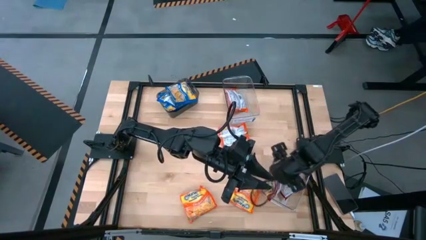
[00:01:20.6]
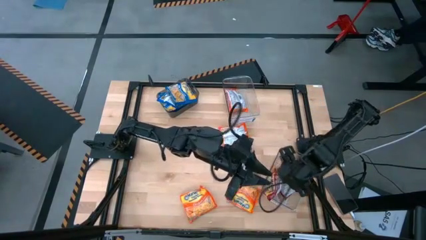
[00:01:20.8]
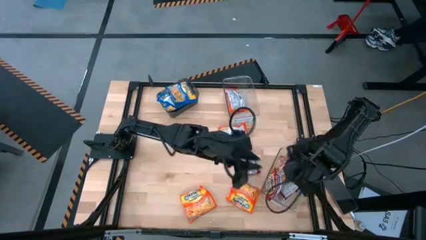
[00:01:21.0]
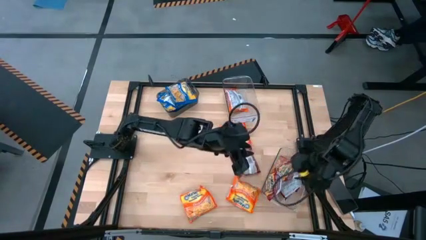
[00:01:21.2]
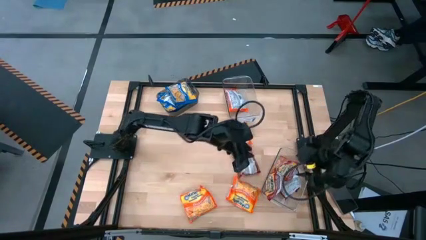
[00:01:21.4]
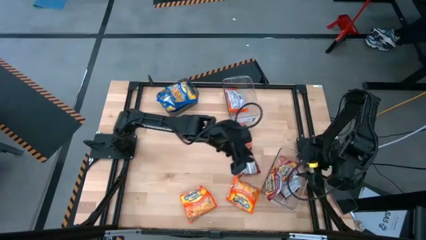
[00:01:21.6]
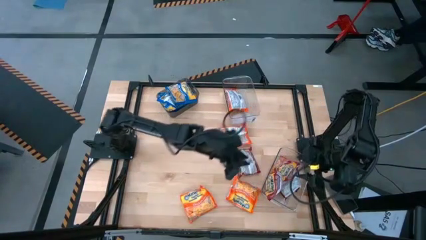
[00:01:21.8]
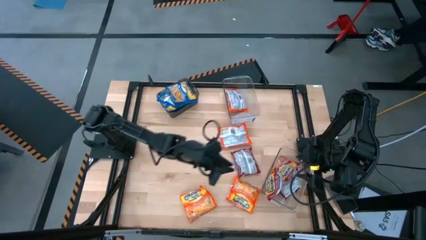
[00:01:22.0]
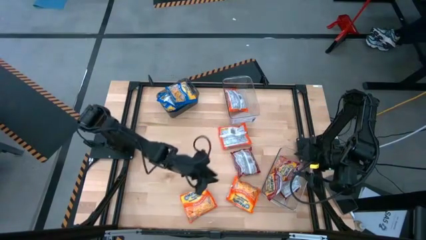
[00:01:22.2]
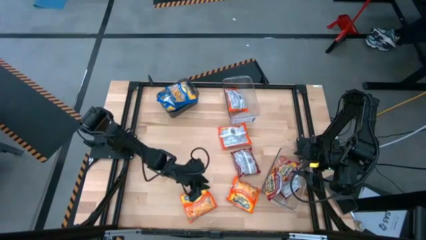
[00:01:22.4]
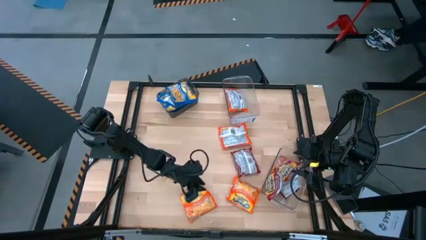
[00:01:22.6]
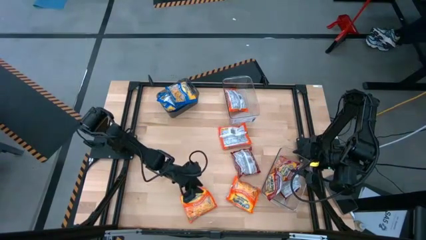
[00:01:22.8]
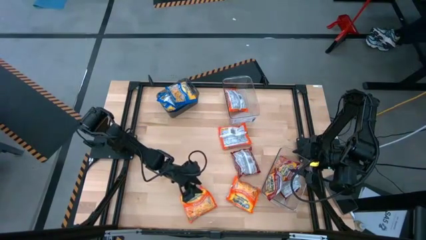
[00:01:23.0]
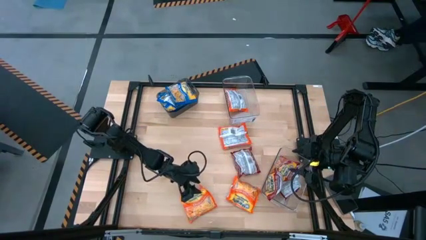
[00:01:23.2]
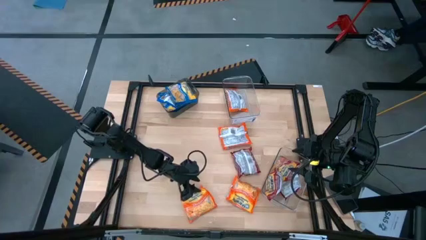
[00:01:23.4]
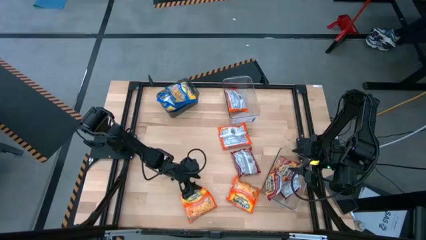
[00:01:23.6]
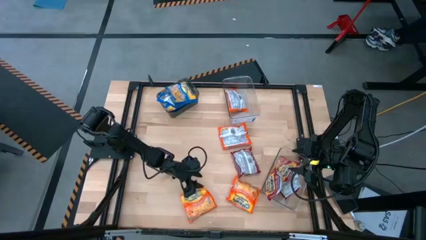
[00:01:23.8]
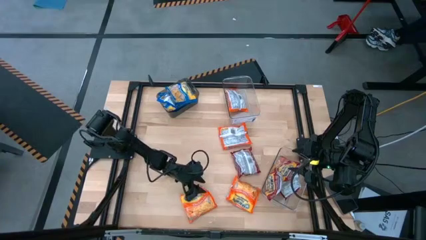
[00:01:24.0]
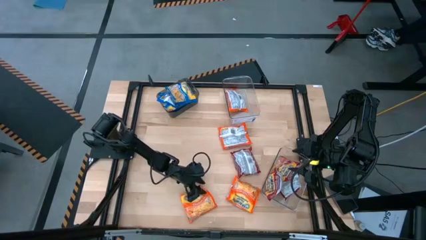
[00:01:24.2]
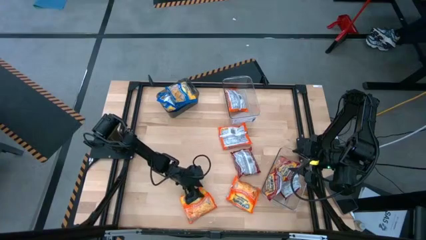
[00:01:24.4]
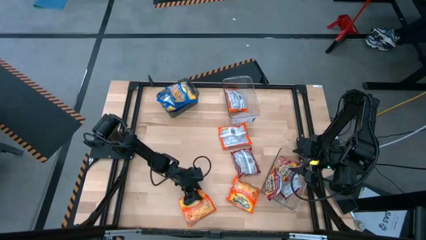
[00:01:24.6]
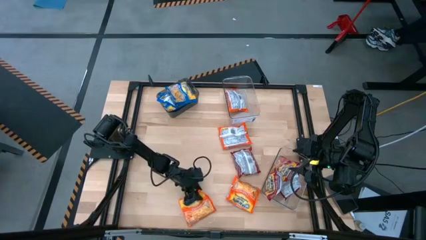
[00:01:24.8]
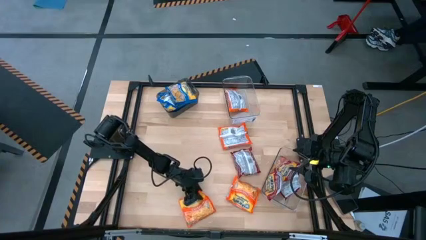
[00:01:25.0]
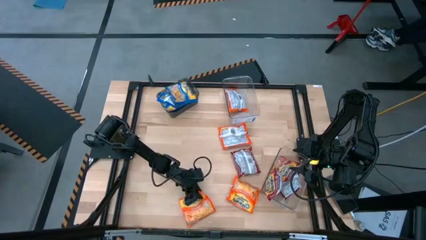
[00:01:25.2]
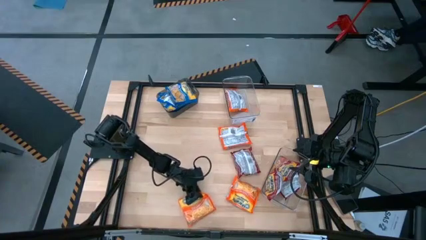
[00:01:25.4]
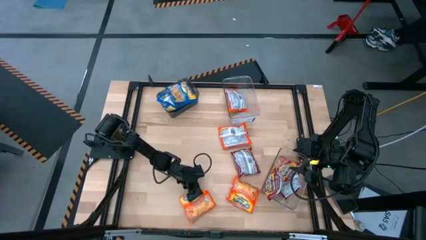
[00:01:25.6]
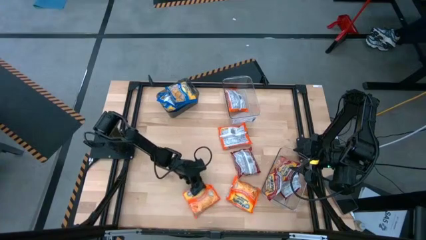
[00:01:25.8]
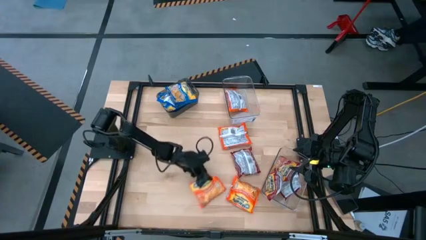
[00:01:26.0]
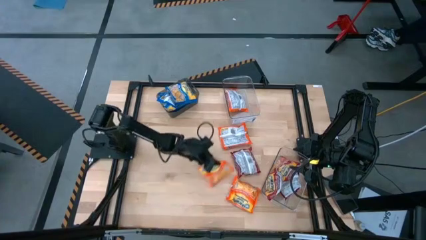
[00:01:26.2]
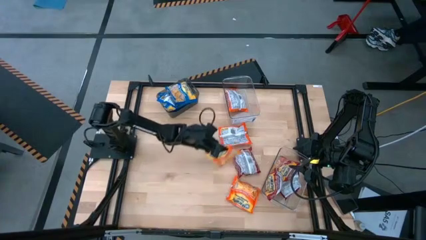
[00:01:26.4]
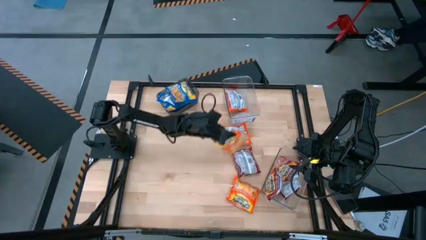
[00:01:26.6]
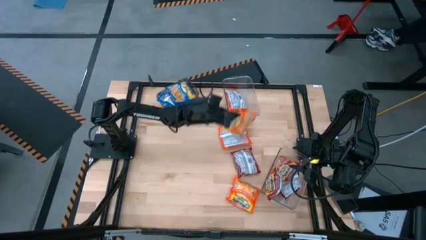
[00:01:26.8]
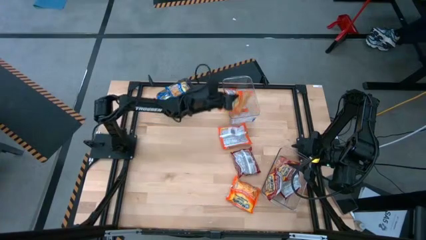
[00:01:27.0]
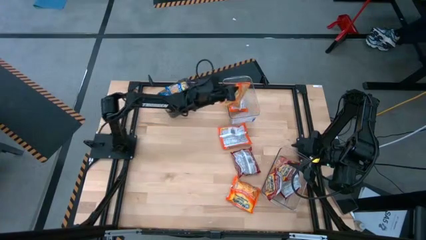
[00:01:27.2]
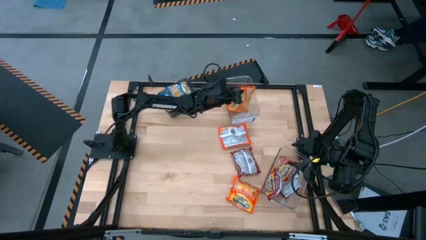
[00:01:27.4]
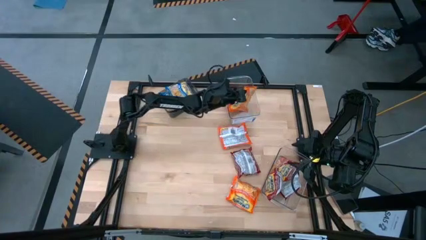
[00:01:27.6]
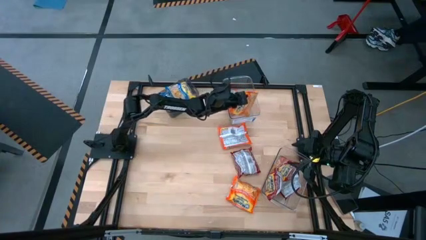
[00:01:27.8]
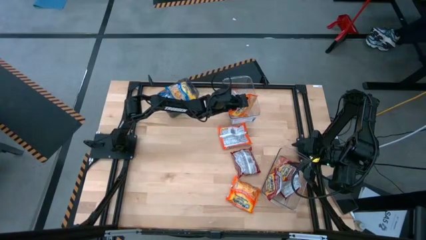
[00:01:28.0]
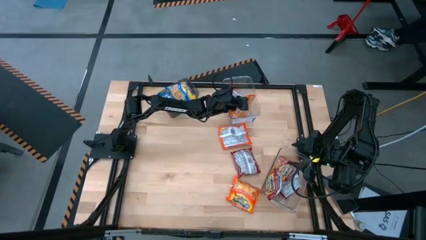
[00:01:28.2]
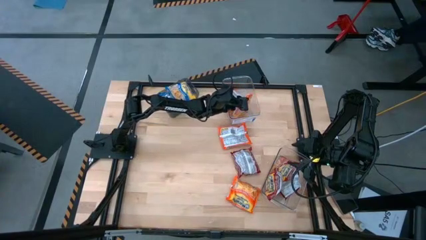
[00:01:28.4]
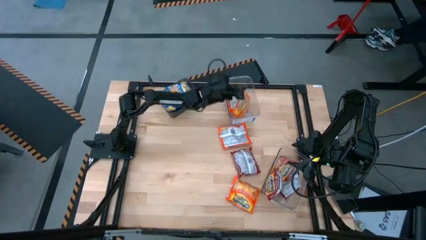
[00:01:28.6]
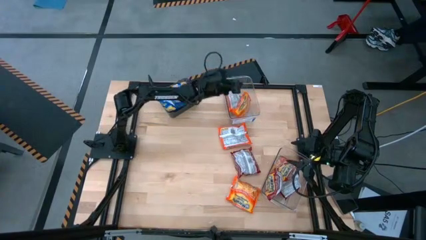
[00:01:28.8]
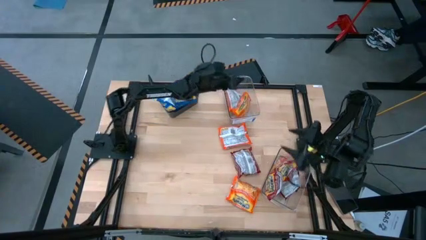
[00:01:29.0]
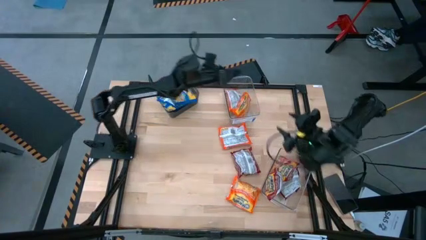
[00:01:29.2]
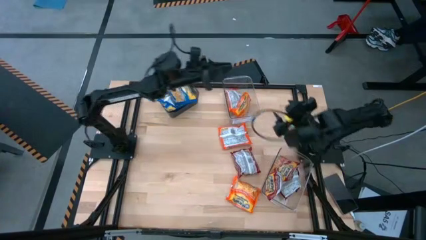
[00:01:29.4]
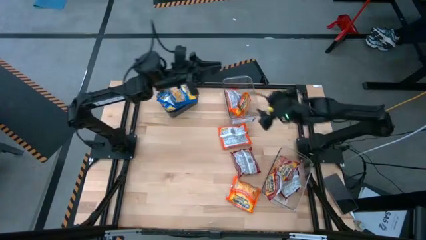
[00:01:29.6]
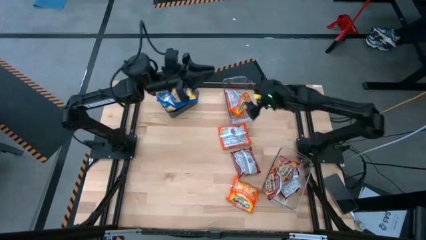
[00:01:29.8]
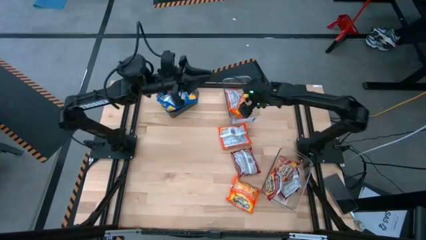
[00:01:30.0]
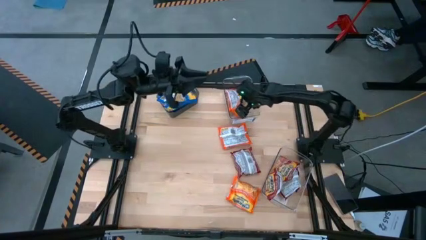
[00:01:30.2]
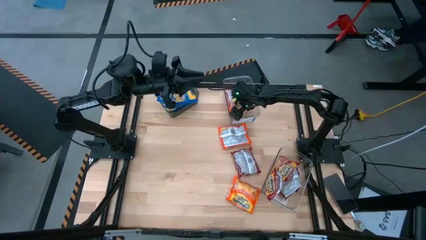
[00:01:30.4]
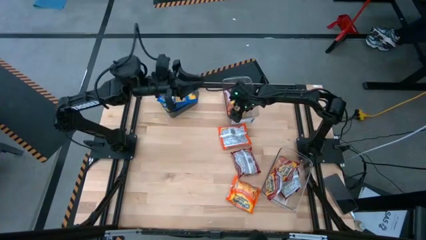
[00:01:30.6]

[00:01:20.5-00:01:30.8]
Task: Sort Maruchan noodles
Put the orange noodle pack into the top transparent bin

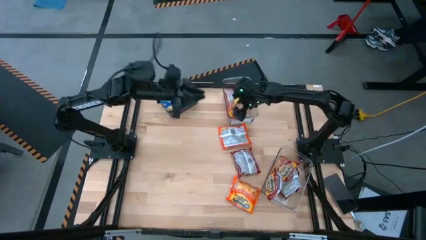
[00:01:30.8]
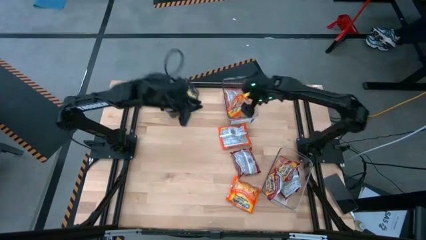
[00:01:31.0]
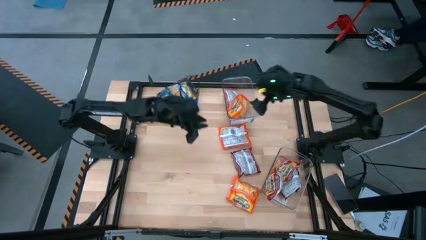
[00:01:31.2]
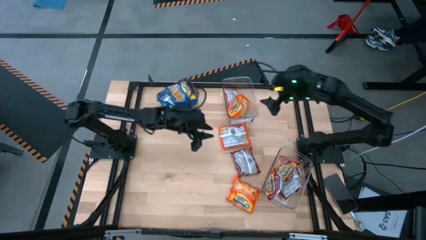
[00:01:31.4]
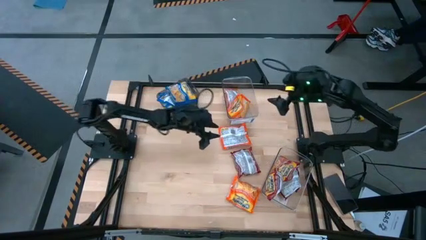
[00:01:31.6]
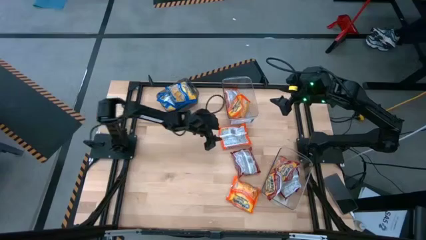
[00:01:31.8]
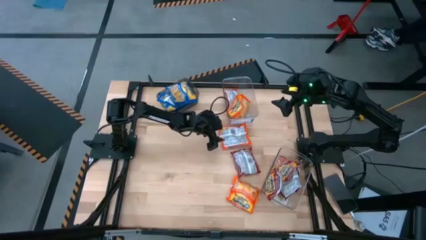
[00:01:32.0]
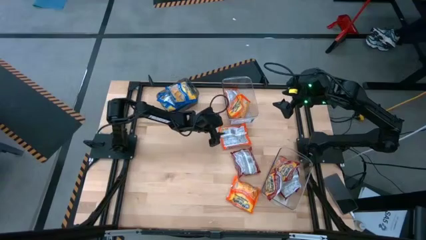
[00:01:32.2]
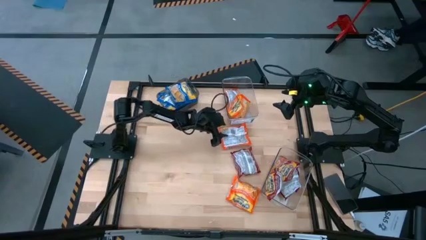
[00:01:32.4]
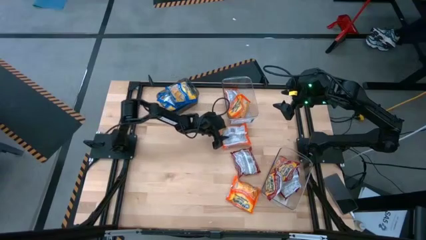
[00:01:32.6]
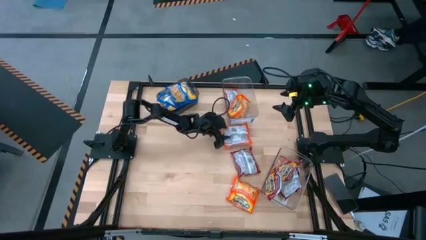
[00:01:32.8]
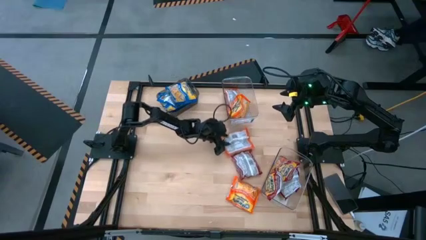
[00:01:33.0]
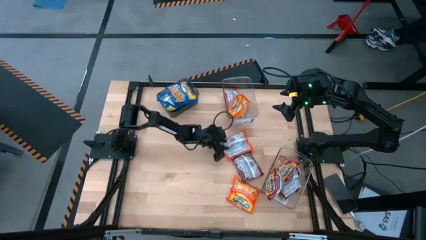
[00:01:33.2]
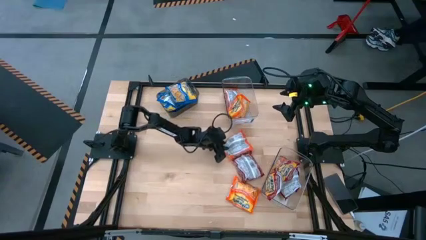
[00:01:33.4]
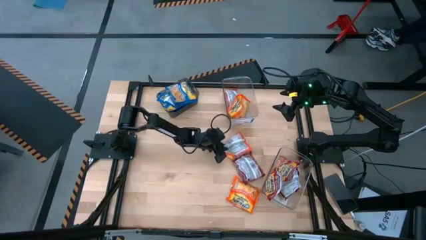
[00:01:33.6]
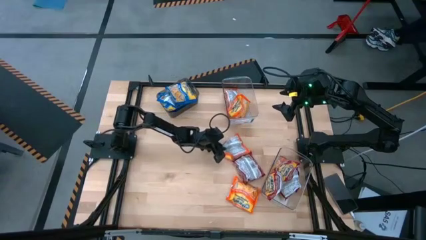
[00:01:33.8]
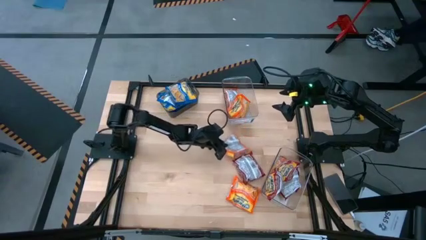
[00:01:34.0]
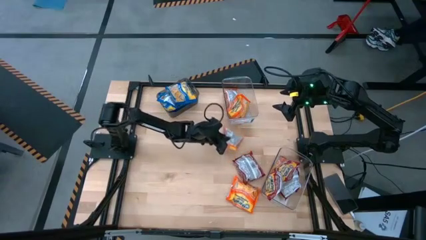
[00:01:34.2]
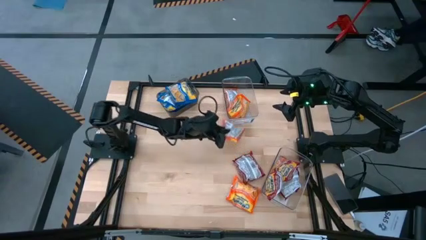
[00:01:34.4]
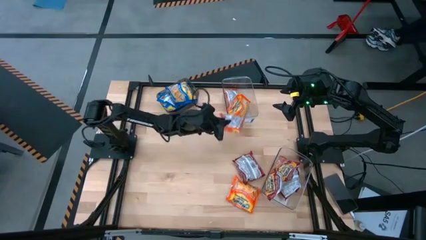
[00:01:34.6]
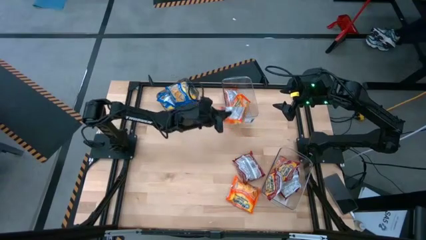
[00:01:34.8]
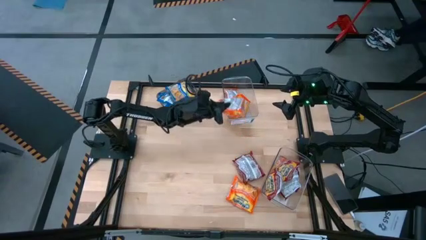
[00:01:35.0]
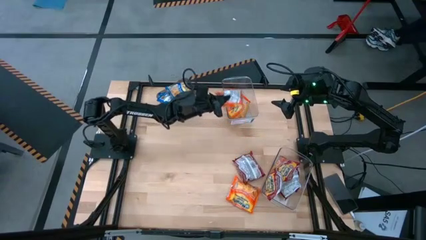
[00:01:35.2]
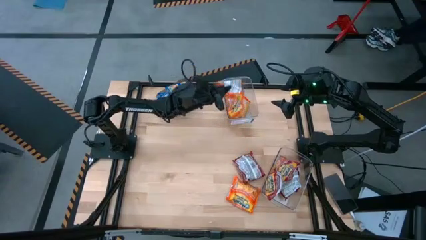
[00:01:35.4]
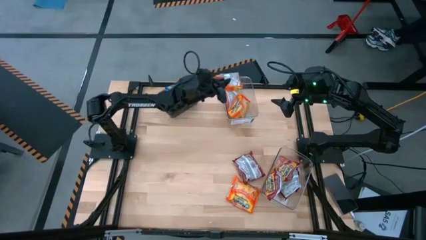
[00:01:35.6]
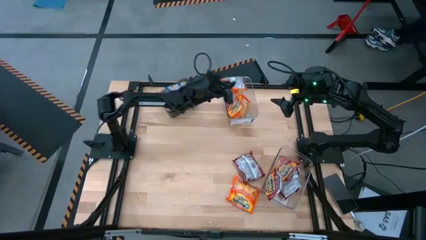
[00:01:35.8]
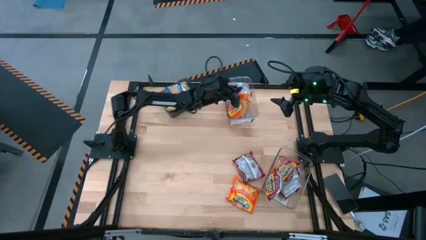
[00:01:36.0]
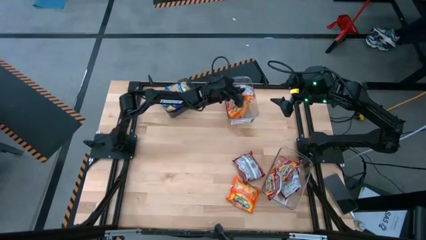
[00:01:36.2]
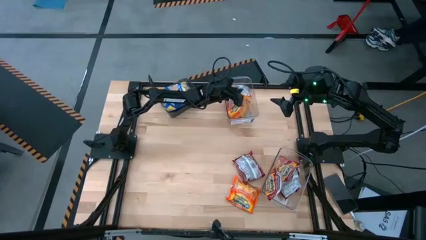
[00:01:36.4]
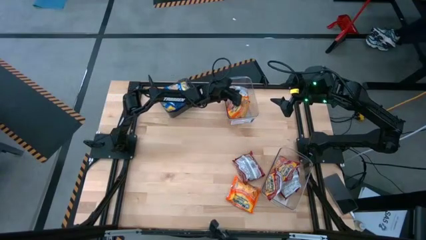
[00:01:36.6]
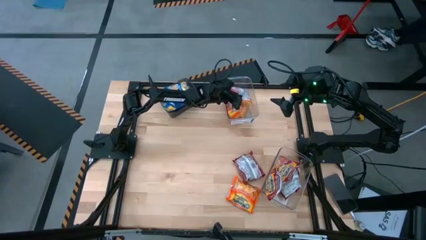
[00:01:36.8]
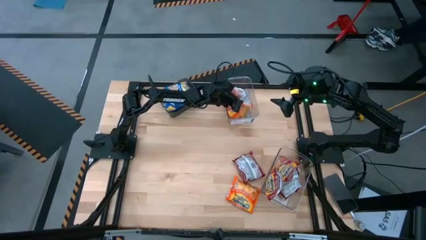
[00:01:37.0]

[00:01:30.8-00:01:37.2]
Put the orange noodle pack into the top transparent bin
